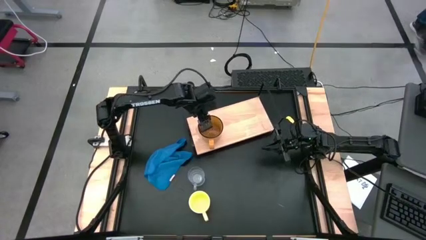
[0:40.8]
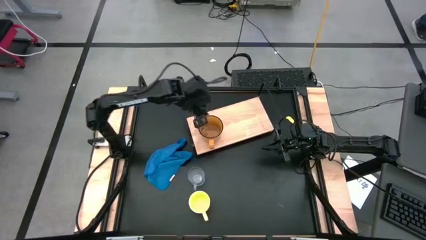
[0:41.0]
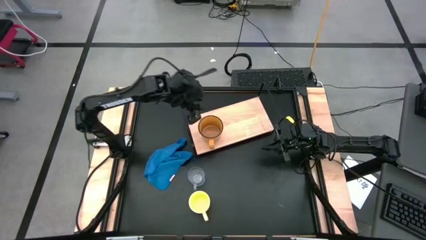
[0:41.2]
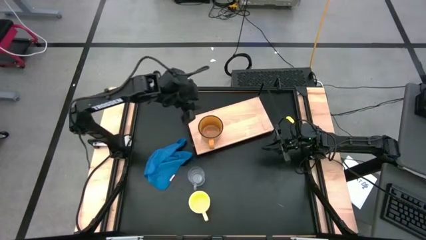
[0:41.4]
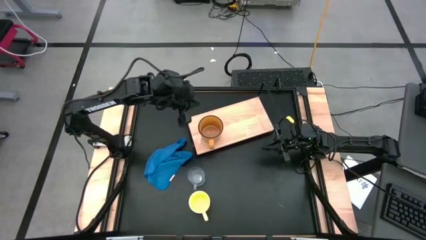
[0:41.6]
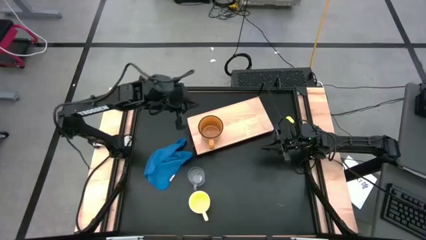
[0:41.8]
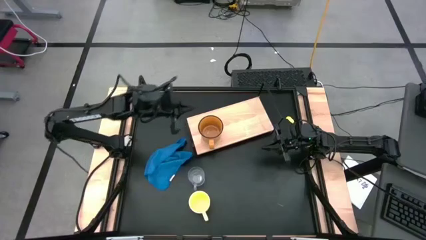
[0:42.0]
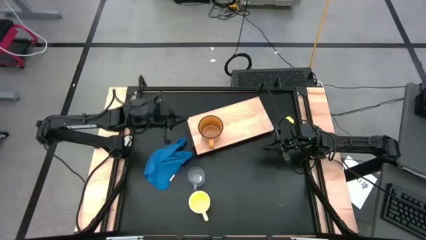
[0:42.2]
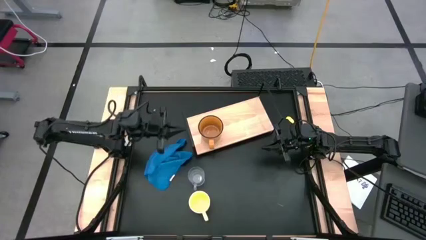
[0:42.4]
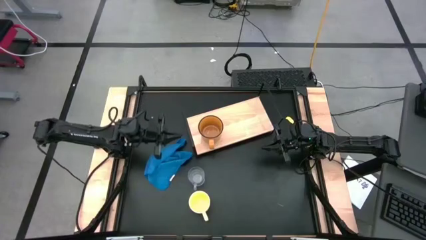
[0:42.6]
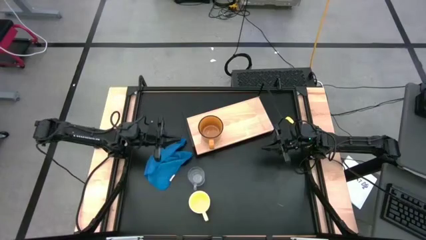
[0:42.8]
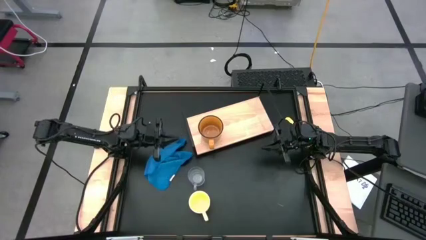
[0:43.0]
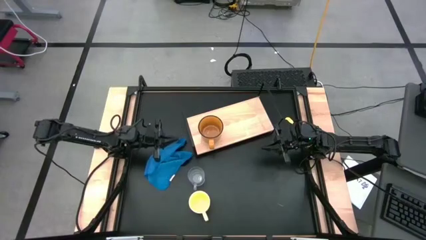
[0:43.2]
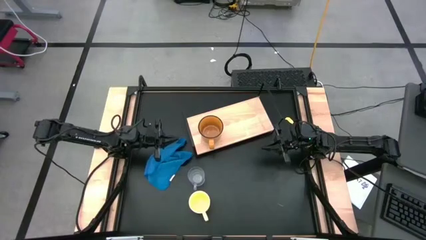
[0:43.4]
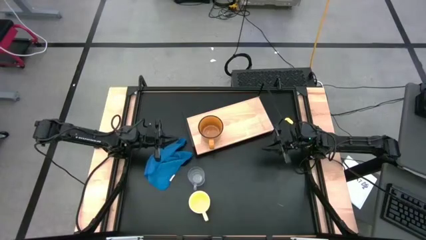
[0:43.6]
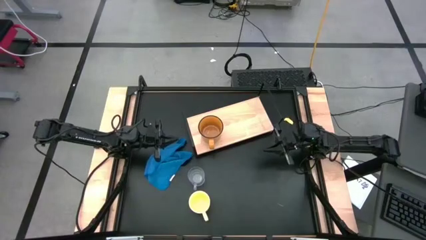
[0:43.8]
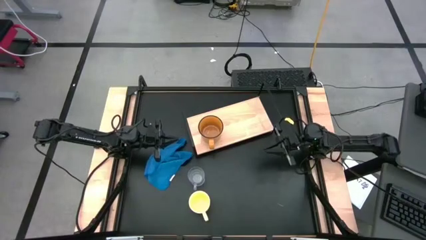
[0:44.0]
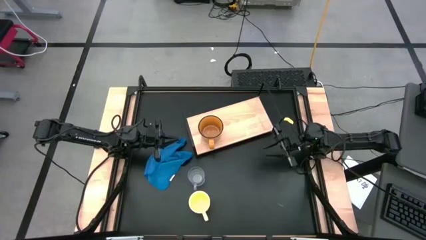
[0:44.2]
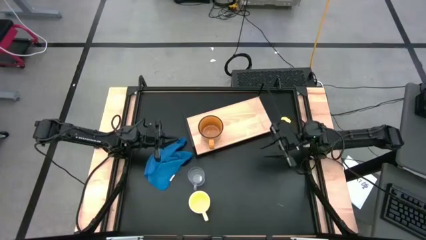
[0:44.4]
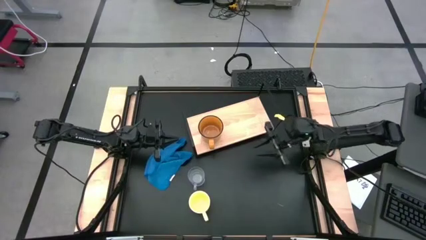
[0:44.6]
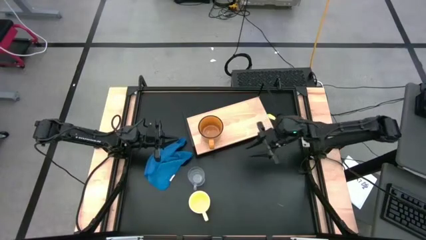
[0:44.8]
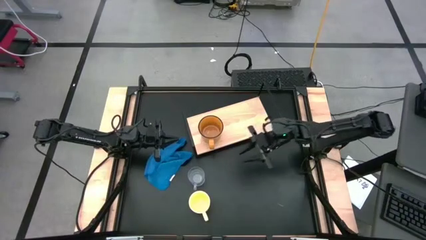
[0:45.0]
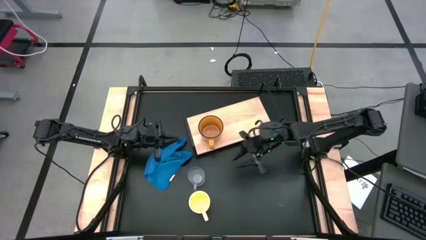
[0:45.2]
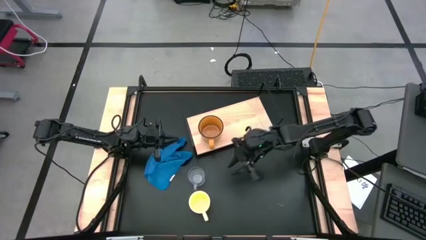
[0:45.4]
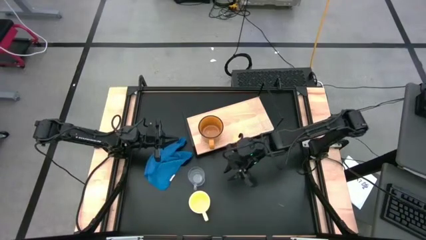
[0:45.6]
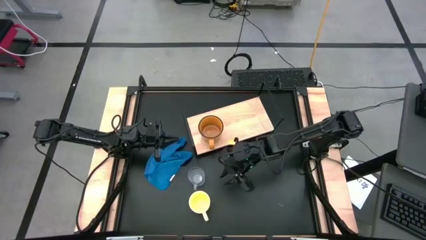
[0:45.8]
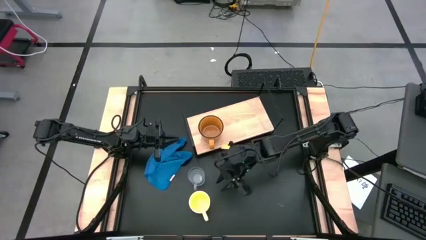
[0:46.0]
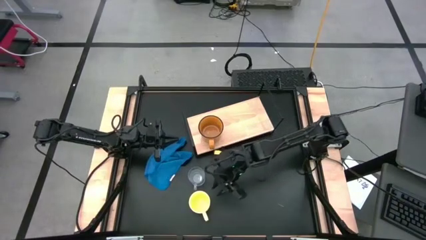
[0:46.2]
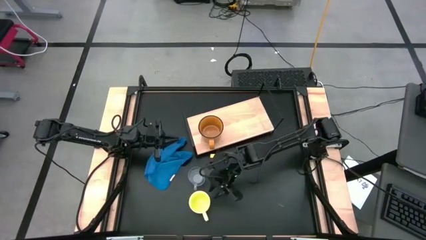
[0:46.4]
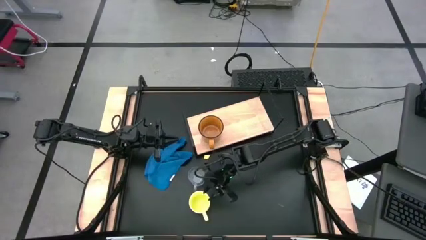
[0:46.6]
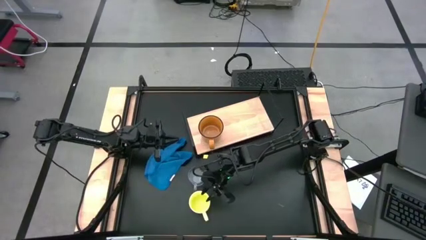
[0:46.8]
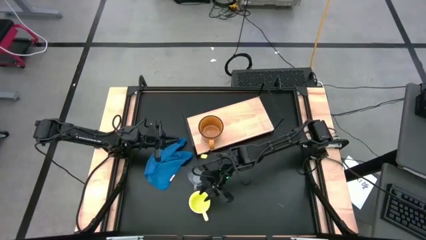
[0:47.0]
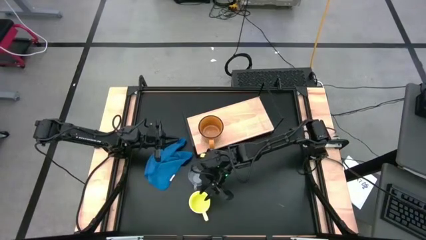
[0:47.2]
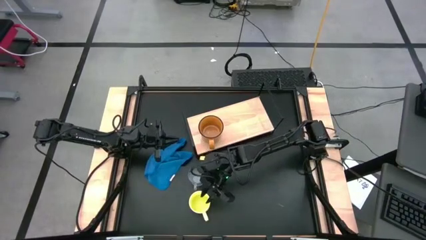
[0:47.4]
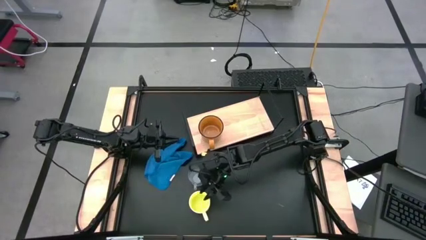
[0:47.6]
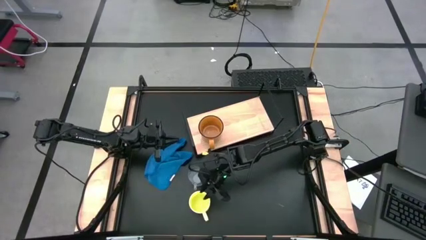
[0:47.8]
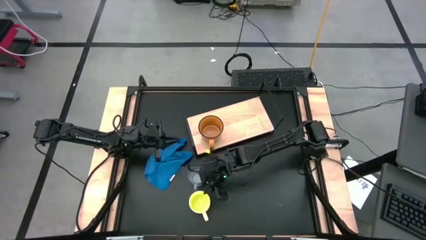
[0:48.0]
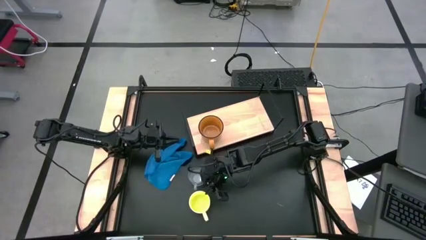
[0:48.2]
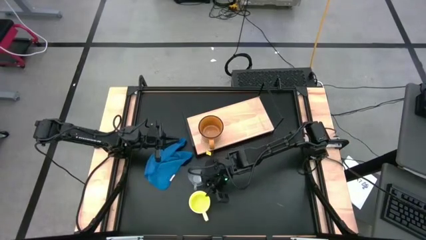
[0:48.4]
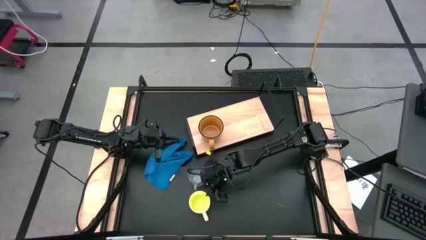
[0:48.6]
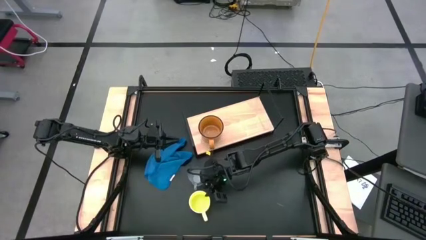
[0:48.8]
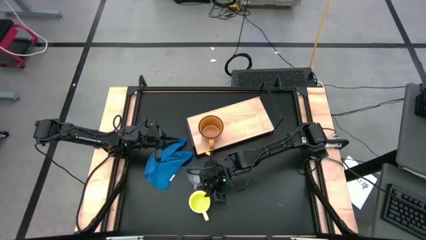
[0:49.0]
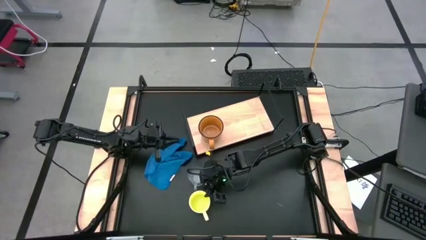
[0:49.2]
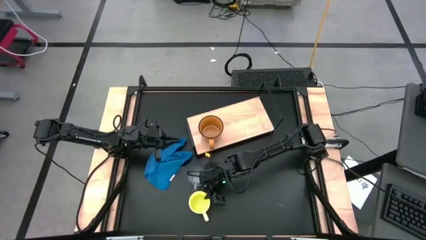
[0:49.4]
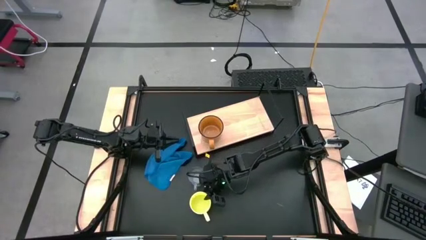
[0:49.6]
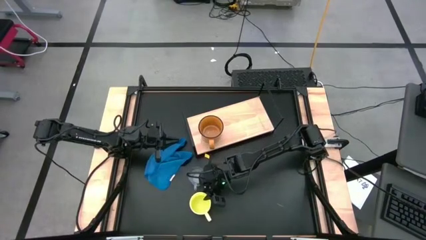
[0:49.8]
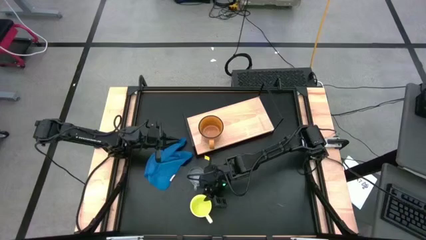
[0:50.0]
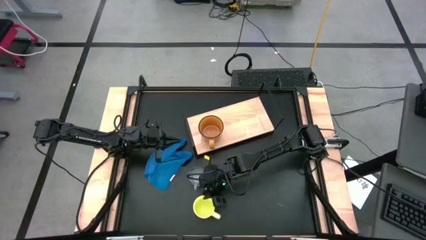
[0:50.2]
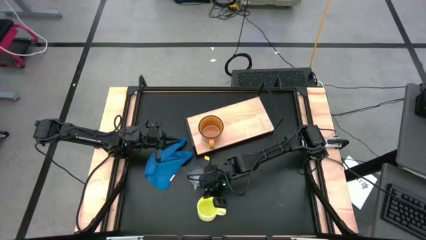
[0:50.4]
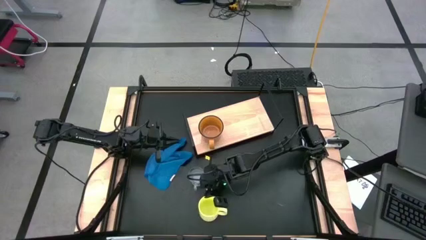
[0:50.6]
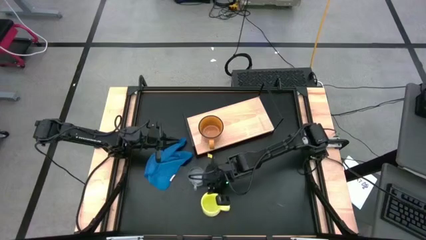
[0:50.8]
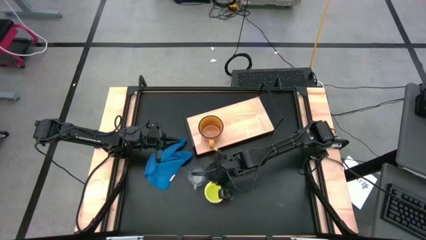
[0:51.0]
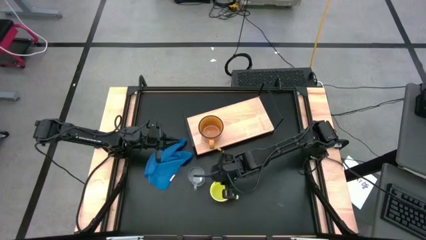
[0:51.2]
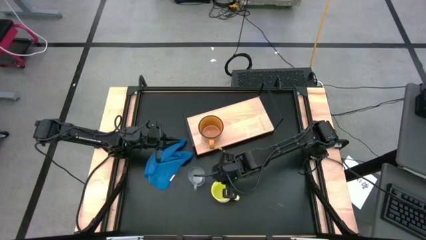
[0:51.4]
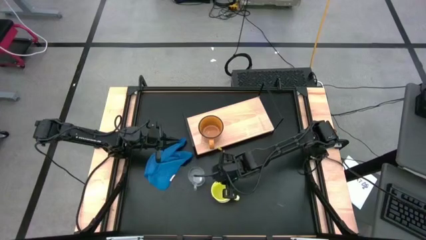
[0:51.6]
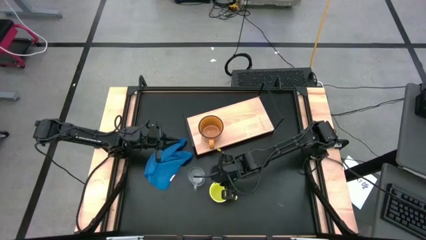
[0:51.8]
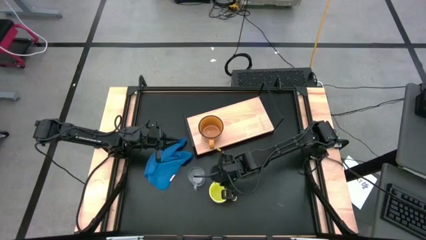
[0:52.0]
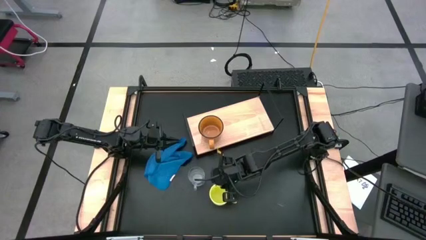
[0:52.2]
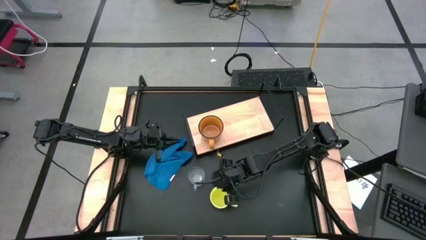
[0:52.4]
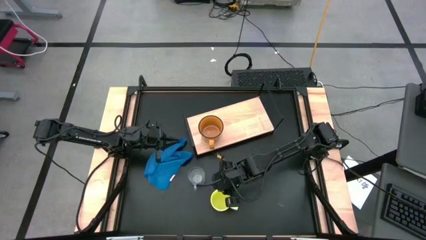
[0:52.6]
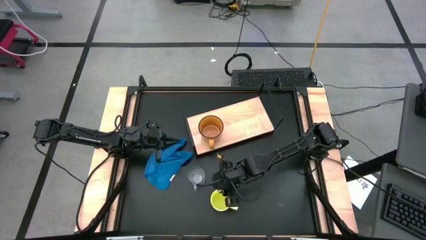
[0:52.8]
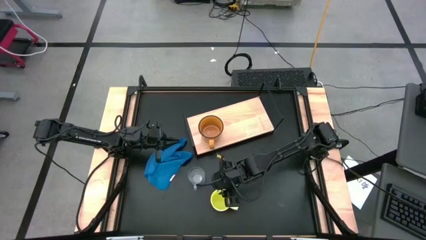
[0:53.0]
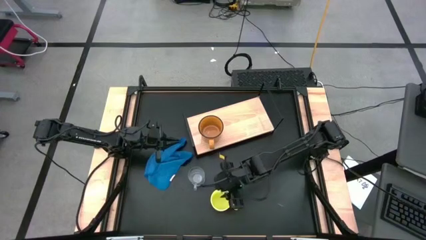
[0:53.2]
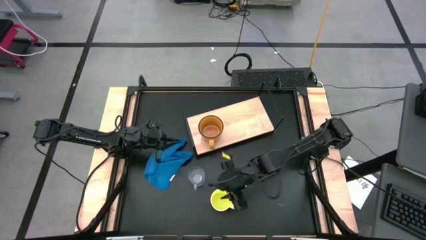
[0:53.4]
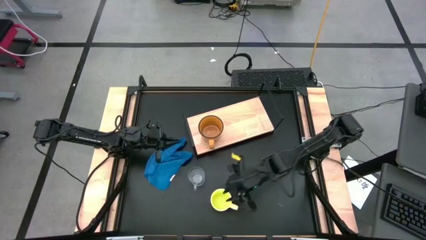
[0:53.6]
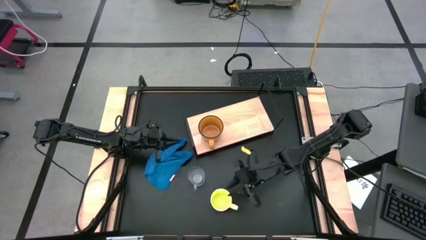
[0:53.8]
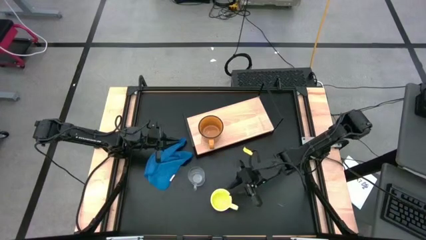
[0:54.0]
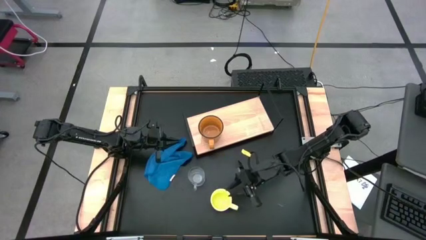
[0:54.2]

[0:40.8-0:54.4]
Task: Stack small to large cups/mugs on shelf
Put the yellow mug on the shelf

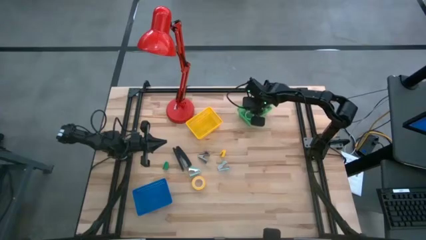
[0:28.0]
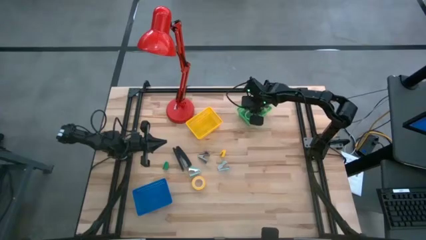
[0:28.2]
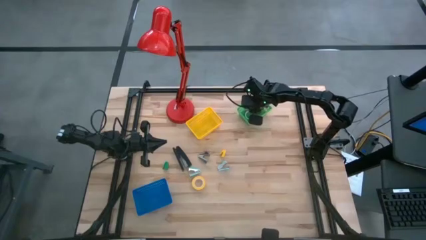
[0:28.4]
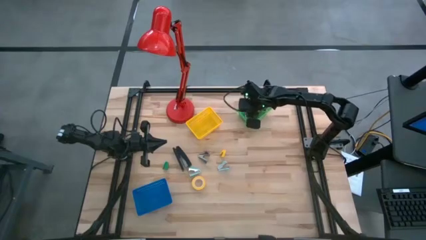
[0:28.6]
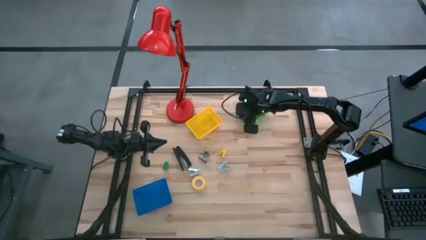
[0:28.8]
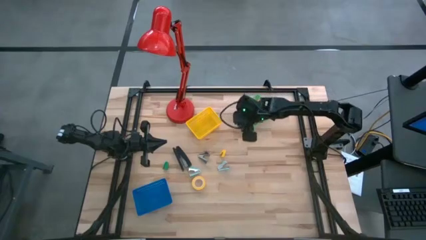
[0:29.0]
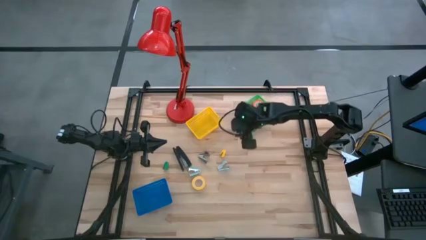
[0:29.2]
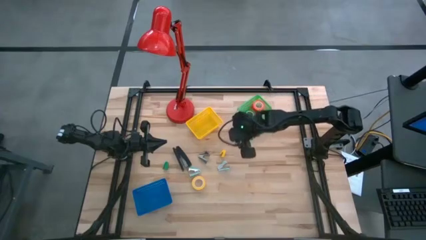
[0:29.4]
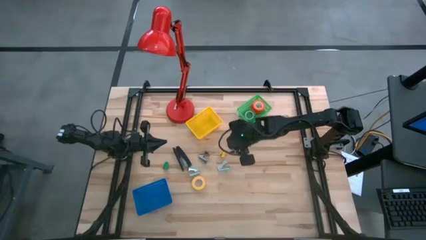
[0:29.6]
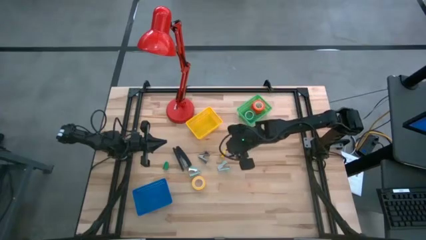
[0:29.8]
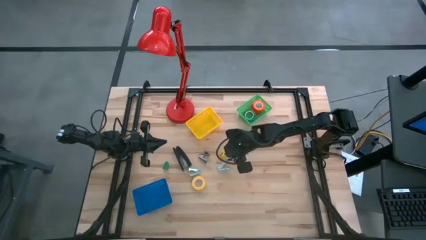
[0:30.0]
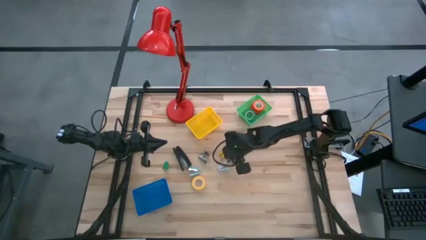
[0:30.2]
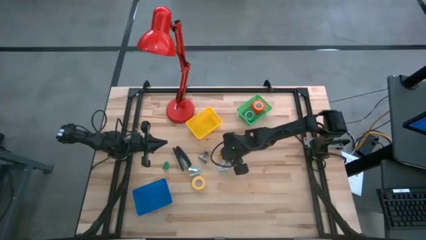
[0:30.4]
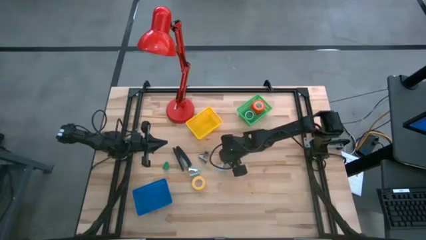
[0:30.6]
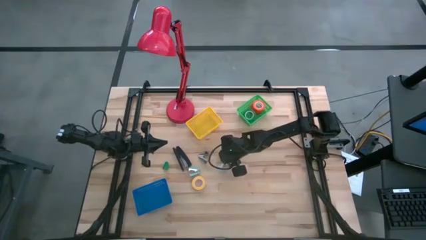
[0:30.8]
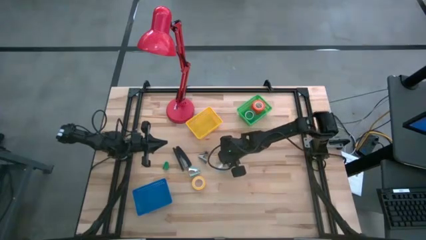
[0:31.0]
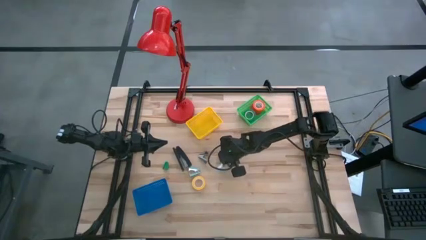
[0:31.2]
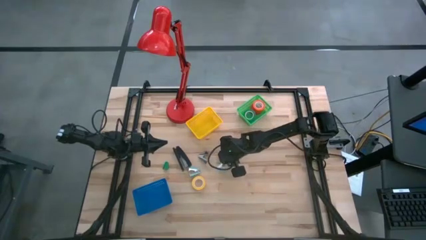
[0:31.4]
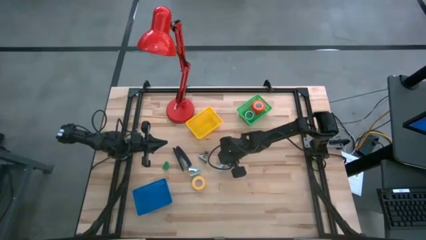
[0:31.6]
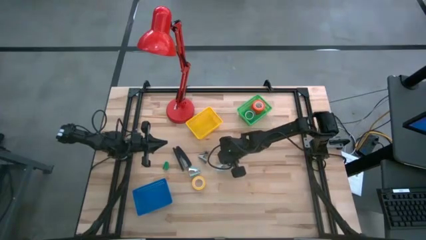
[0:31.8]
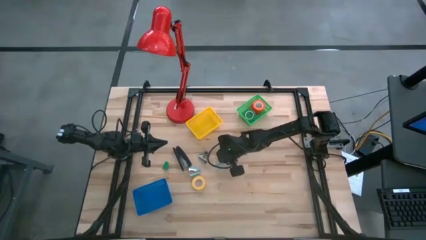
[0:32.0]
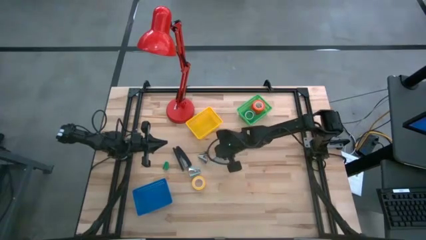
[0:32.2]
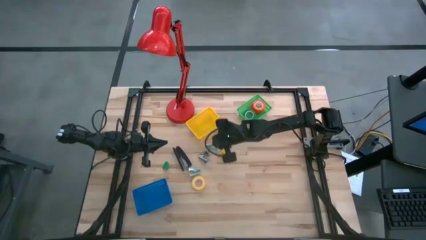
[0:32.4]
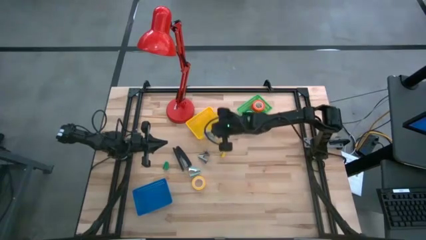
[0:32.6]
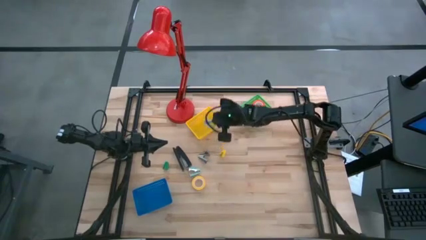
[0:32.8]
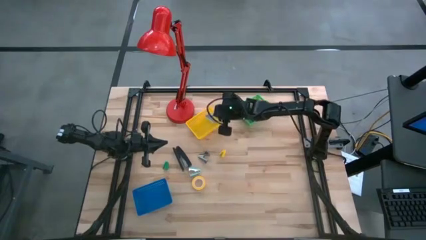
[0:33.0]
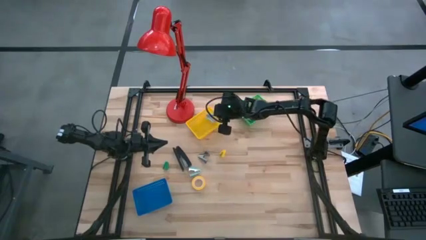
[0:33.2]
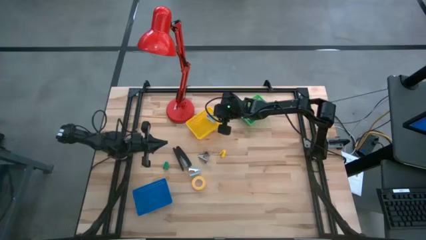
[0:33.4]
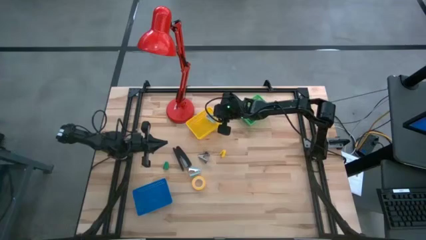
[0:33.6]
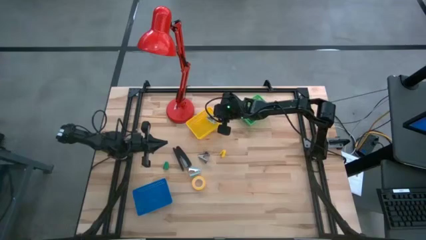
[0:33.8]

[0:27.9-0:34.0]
Task: Pick and place Stapler, Stapler remover, tape
Put the right blue staple remover into the yellow bin
